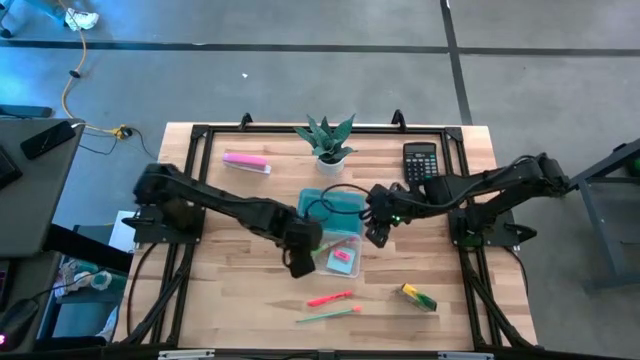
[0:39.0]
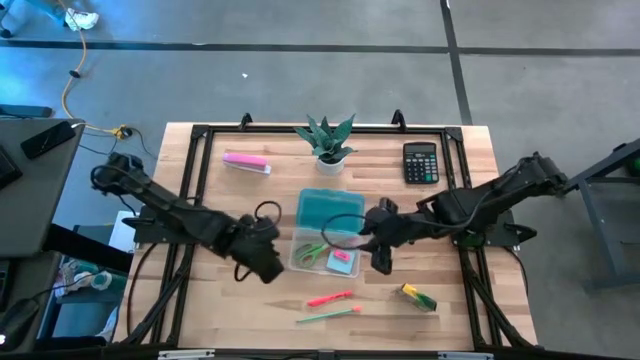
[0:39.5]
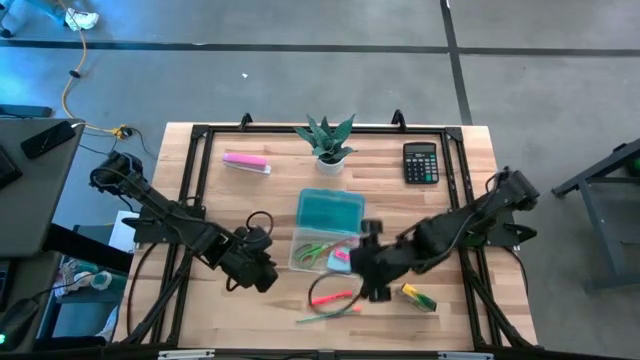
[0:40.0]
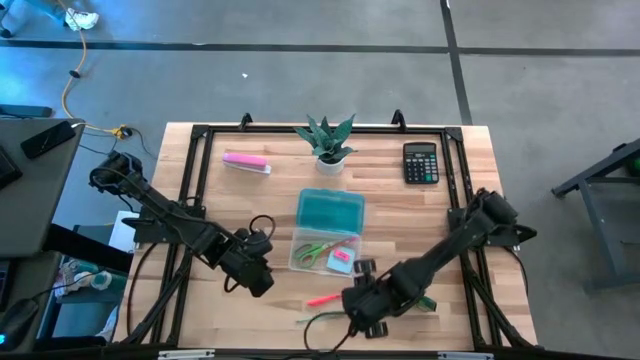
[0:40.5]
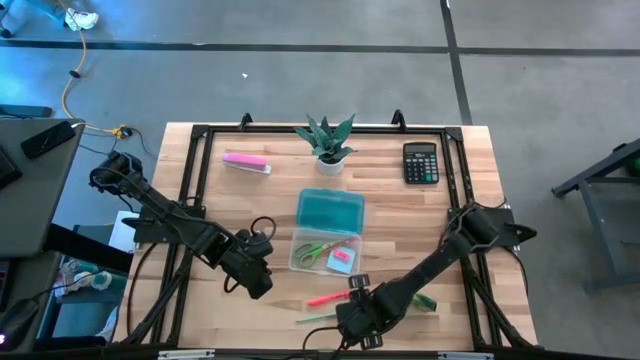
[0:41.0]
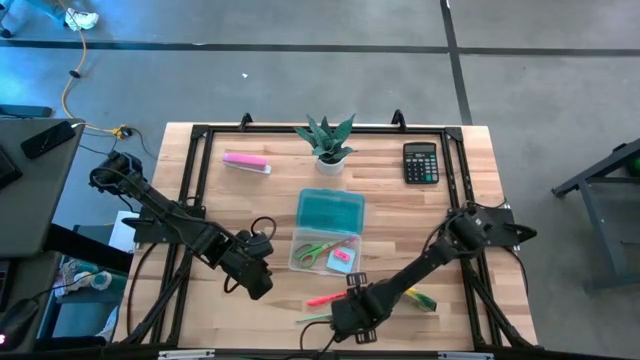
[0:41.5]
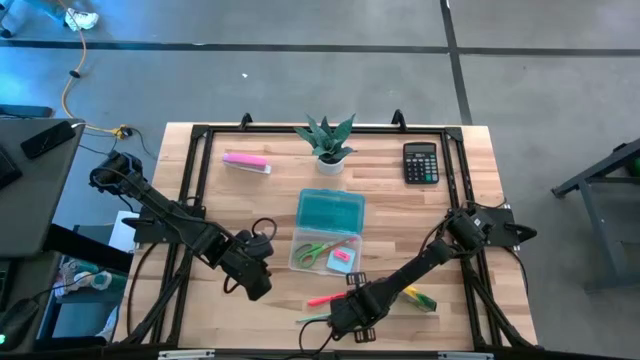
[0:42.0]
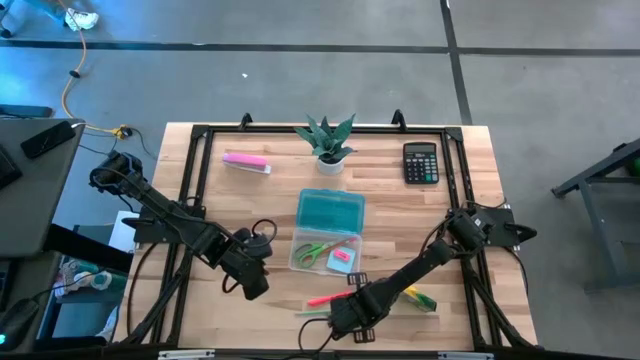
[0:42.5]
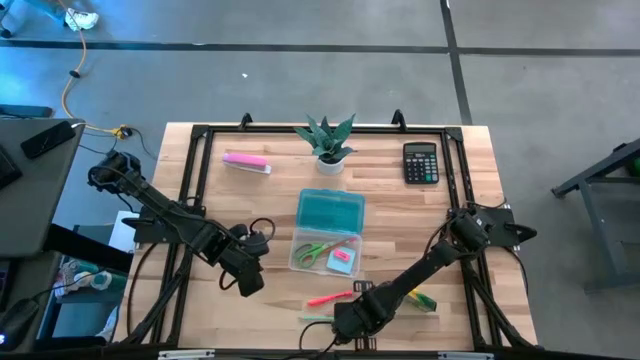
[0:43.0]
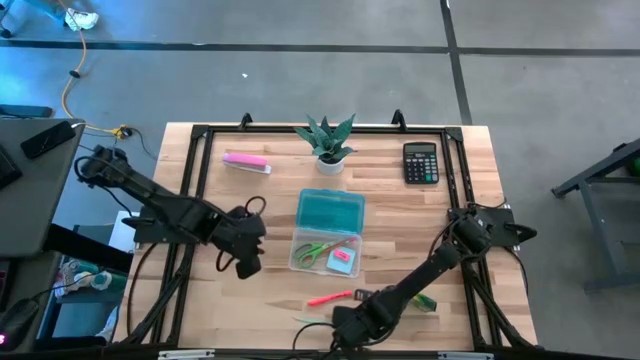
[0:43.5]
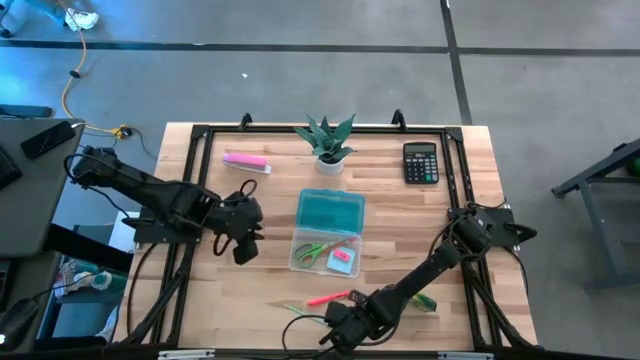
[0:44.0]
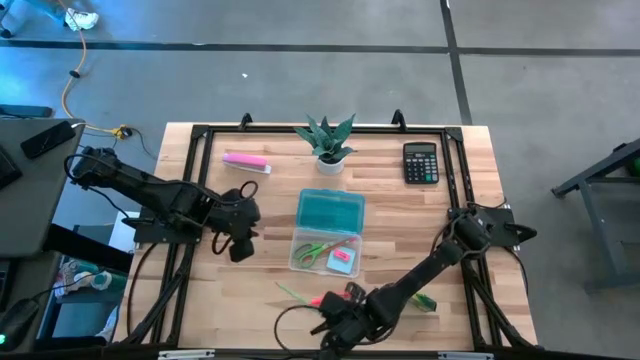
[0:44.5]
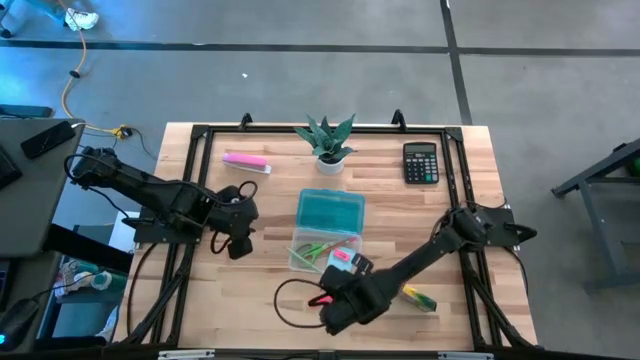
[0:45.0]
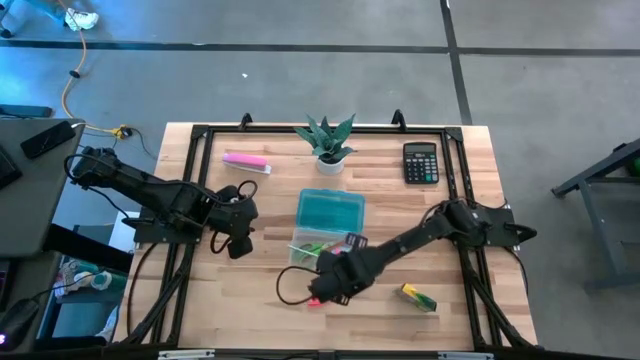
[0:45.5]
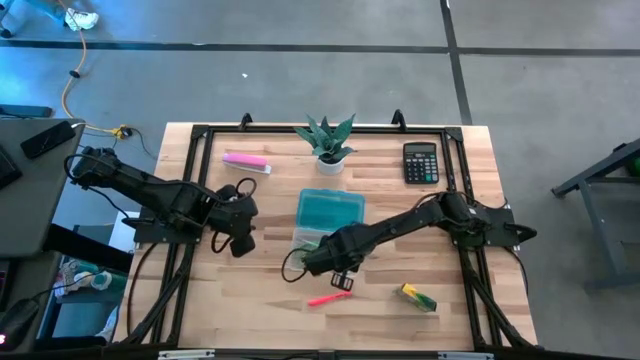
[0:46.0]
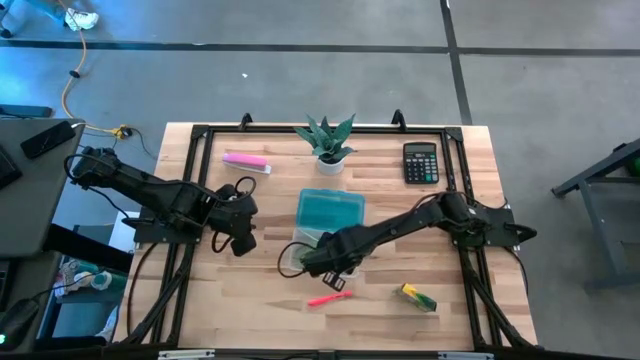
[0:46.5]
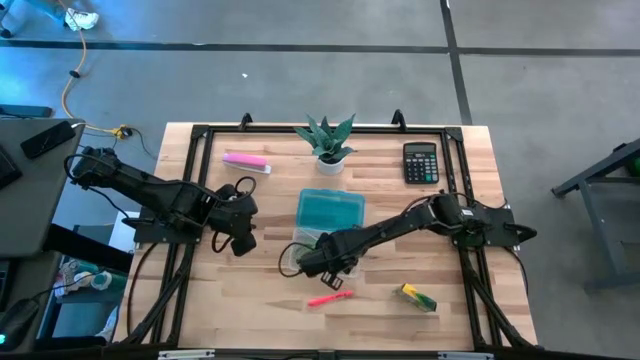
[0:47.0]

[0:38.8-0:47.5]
Task: Pack school essentials
Put the blue pencil into the blue supply box

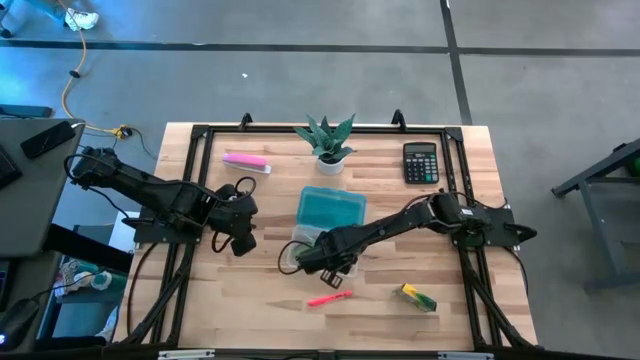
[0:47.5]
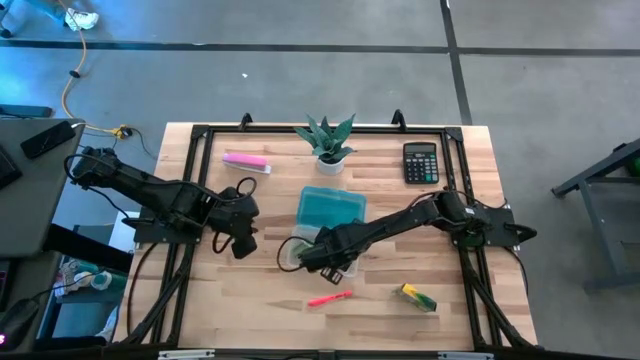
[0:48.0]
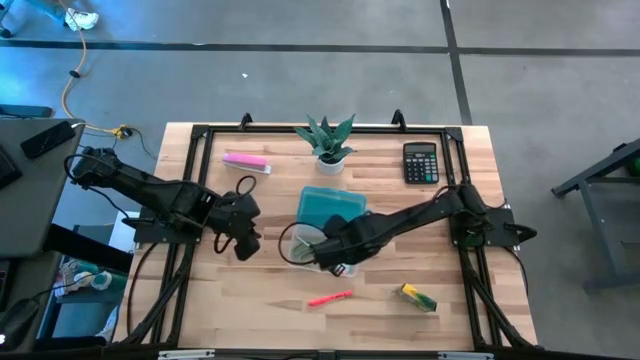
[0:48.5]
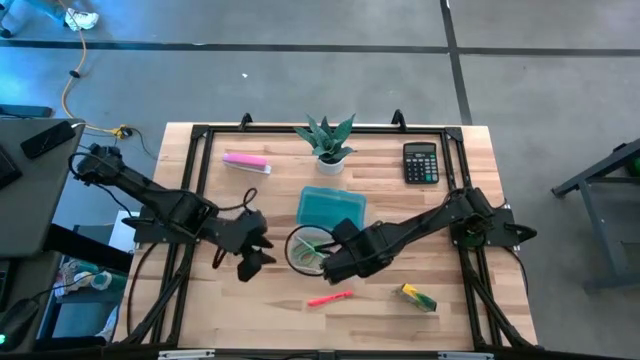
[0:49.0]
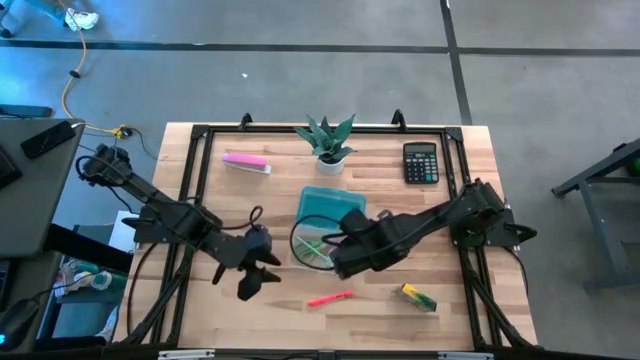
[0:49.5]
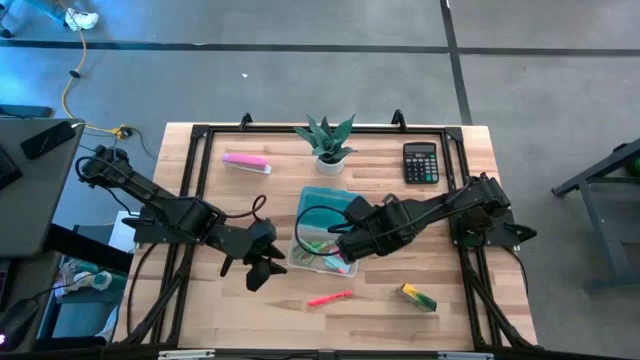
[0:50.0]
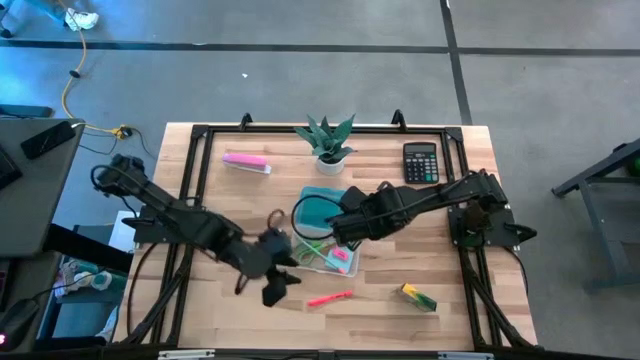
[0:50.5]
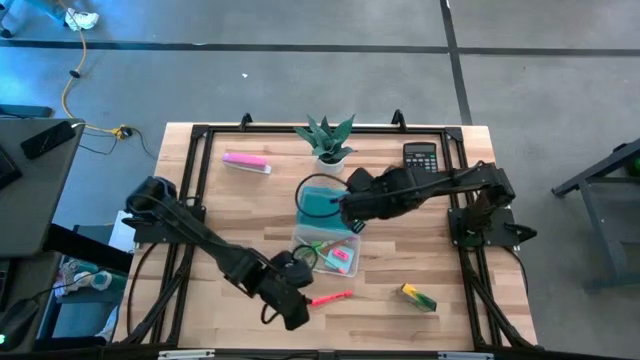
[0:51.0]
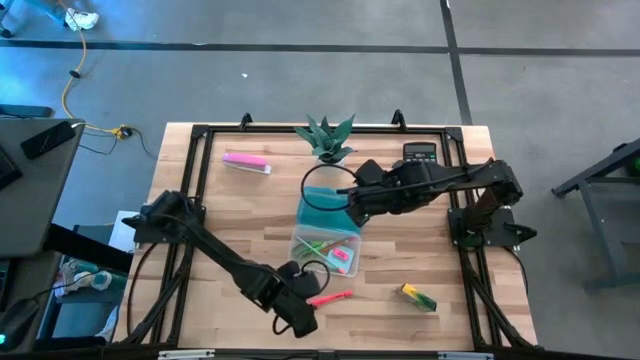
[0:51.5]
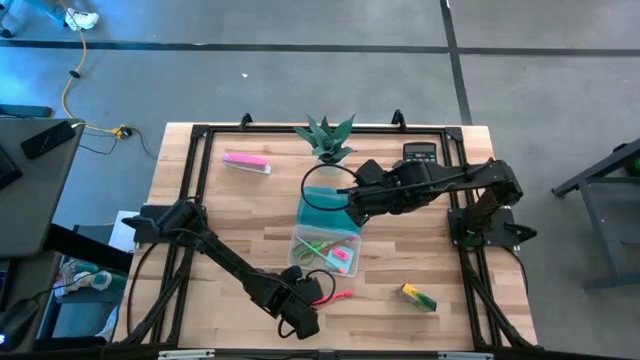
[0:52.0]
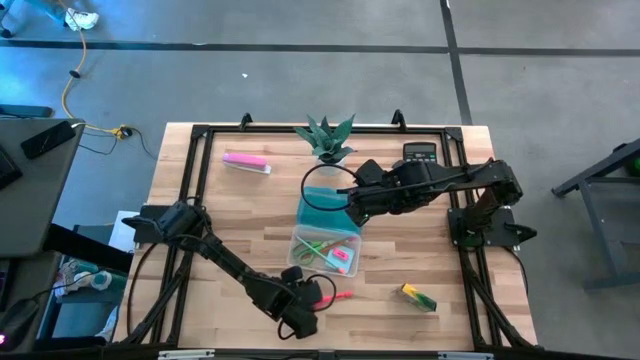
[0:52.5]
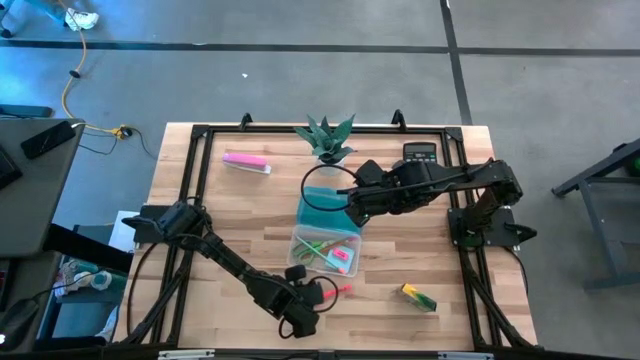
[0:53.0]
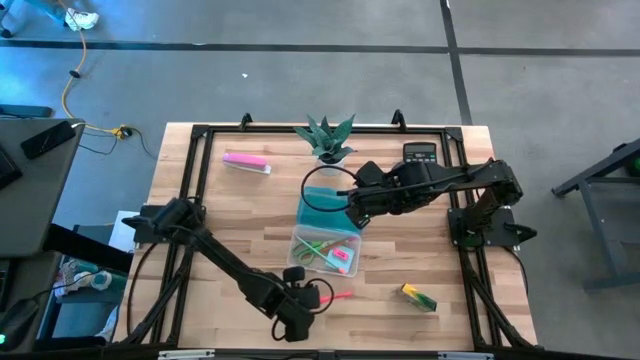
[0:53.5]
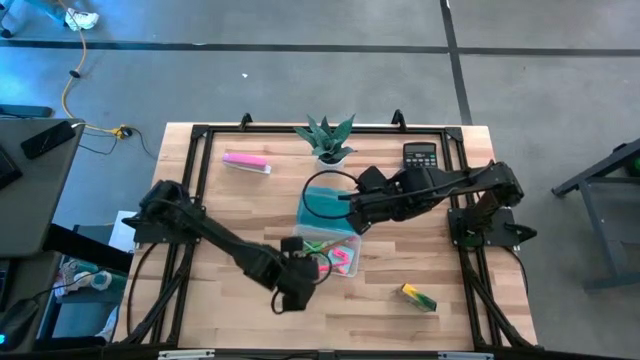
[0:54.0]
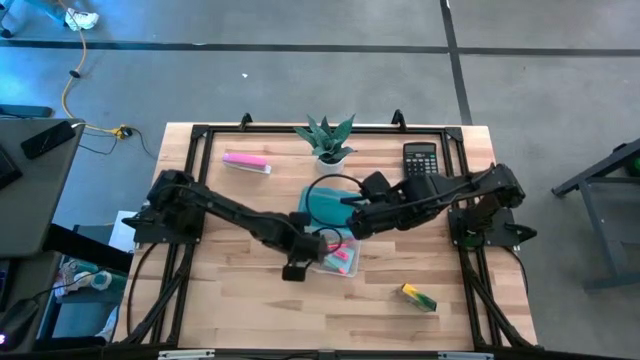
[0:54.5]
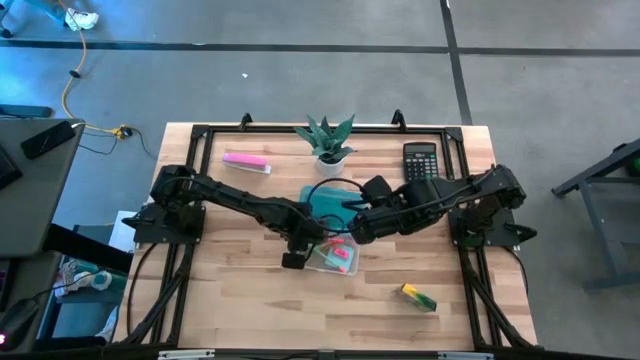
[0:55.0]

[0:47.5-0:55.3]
Put the orange pen into the blue supply box

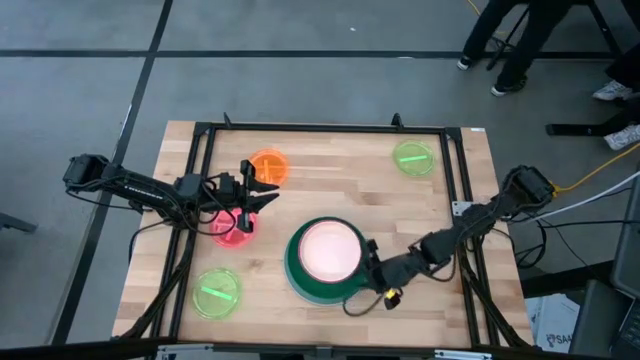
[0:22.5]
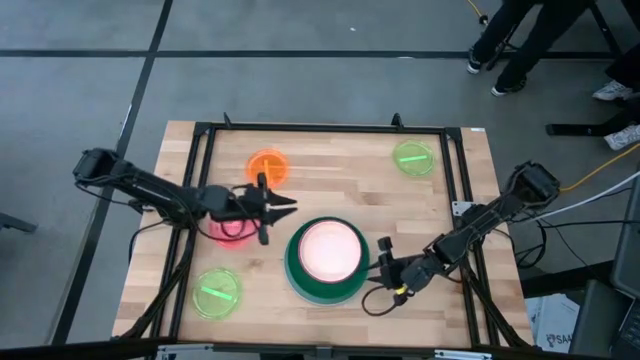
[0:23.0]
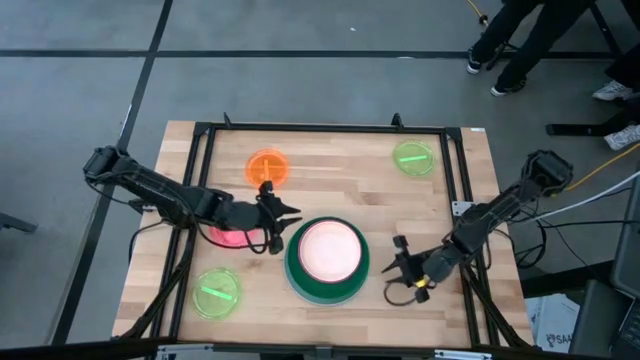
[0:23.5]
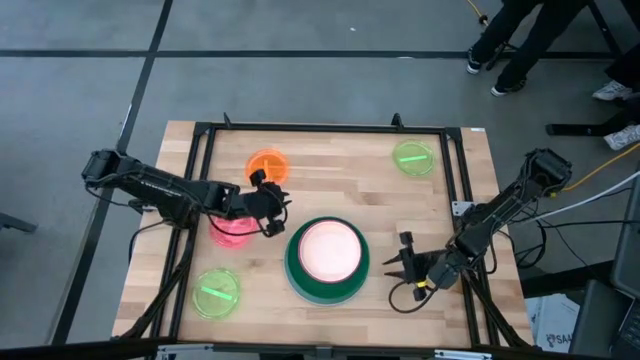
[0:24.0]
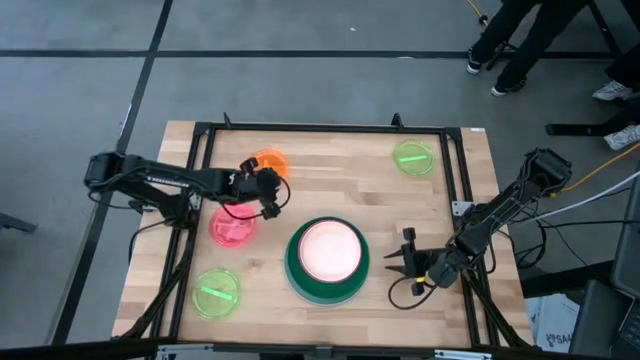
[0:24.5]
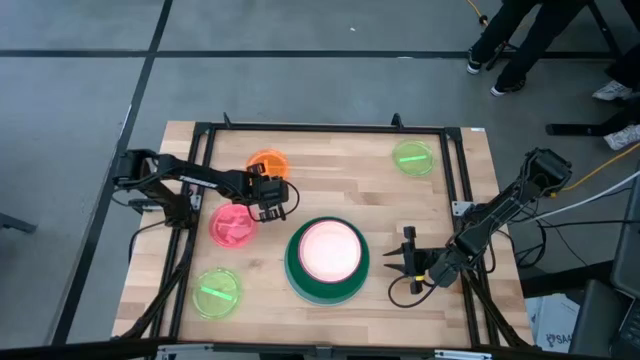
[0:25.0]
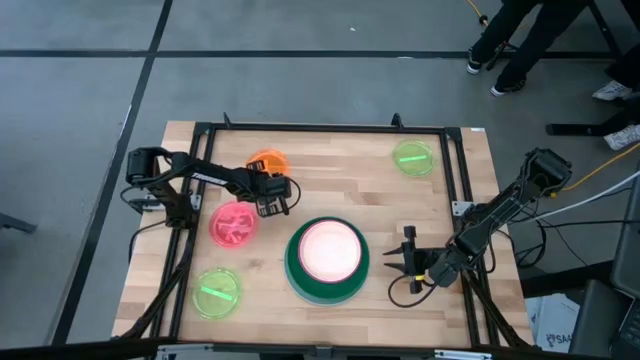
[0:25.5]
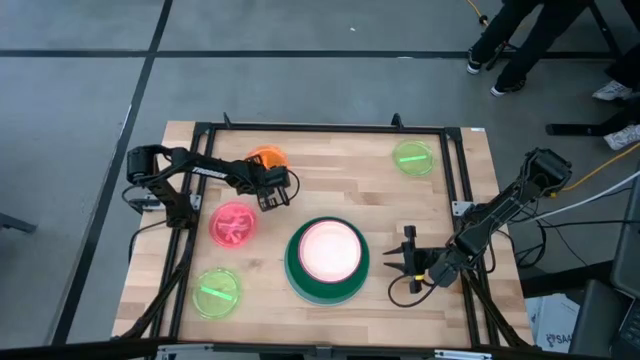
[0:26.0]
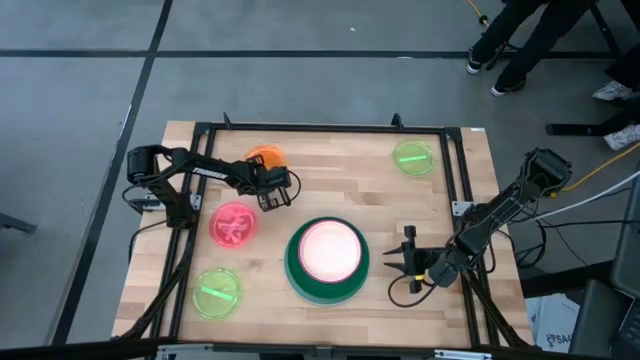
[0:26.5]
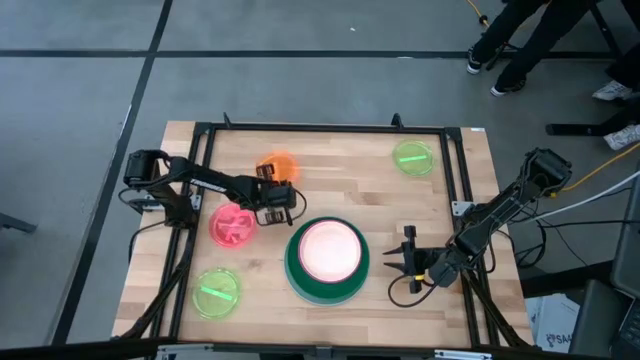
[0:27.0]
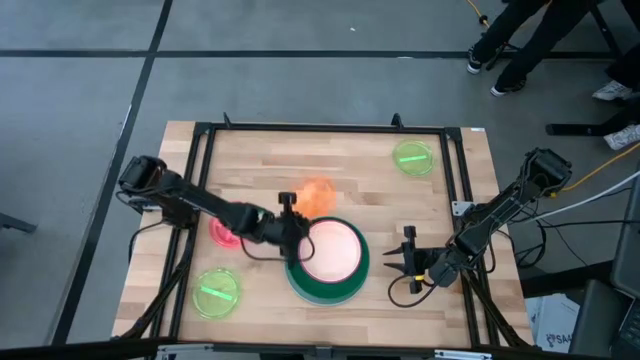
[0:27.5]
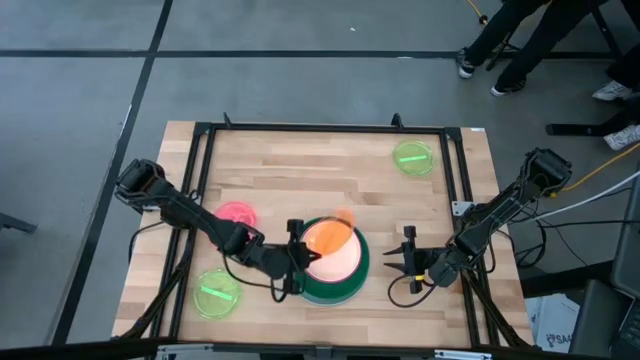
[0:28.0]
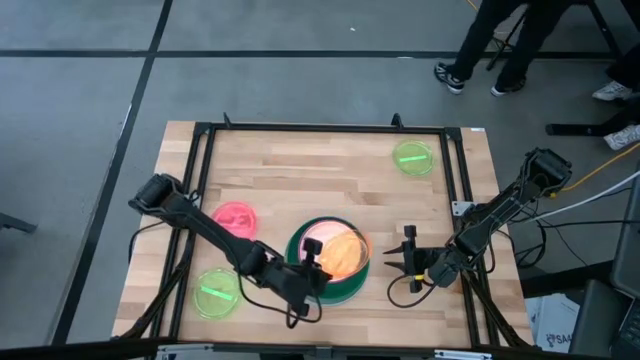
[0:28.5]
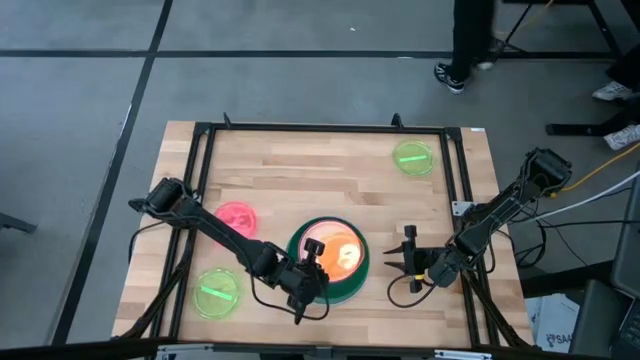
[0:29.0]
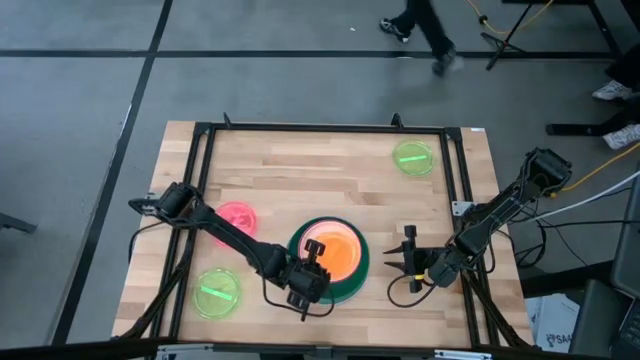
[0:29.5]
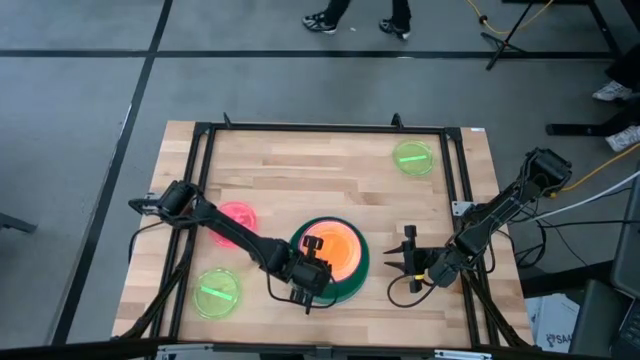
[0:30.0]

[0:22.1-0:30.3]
Task: Stack plastic plates
Stack the orange plate on top of the light orange plate
